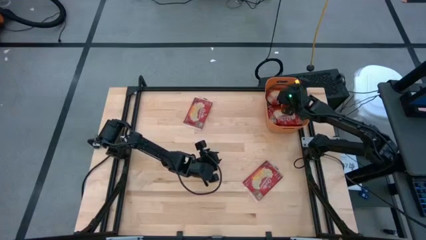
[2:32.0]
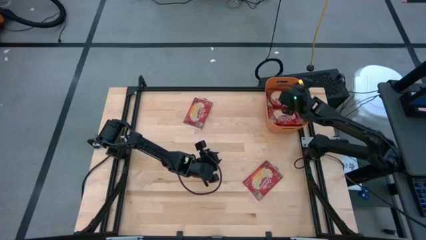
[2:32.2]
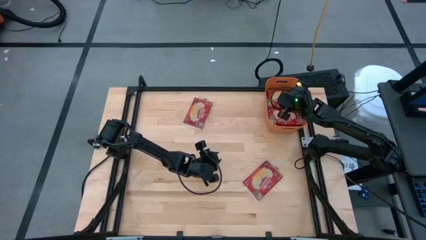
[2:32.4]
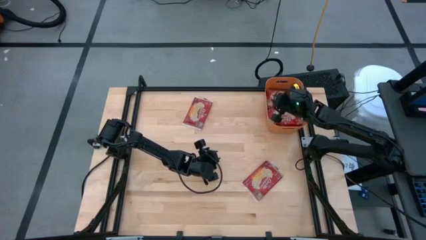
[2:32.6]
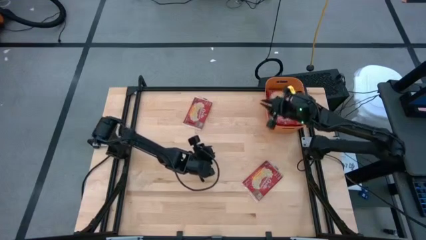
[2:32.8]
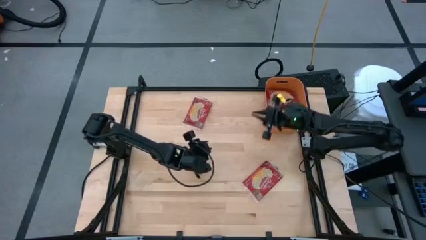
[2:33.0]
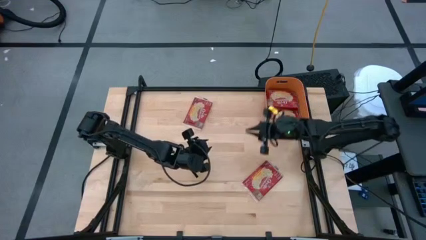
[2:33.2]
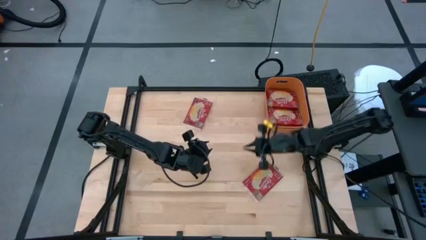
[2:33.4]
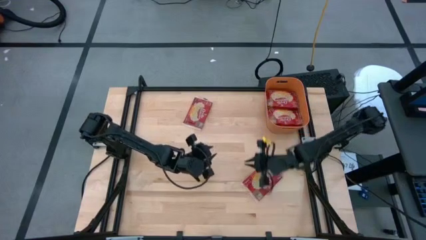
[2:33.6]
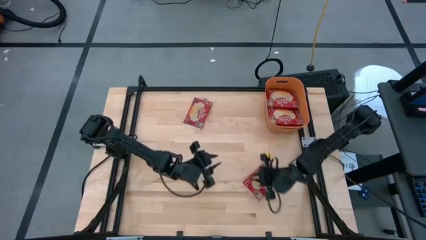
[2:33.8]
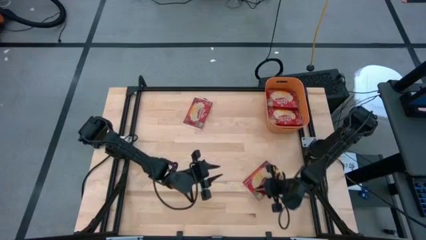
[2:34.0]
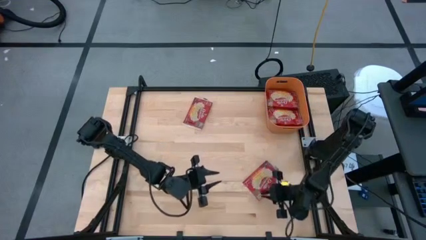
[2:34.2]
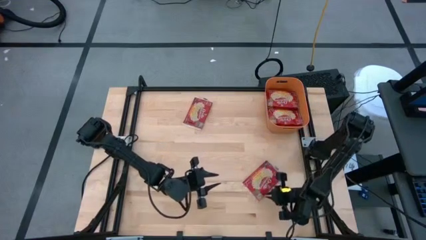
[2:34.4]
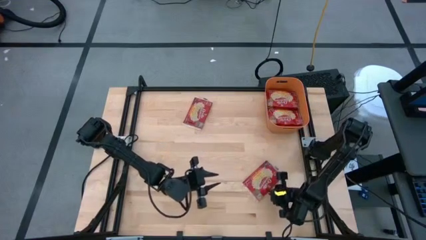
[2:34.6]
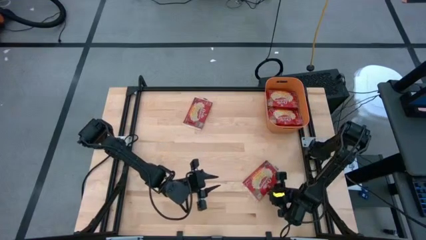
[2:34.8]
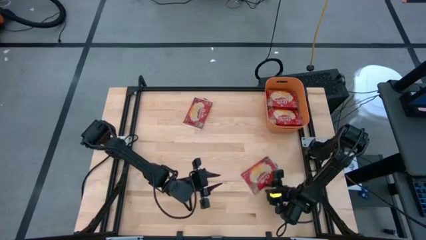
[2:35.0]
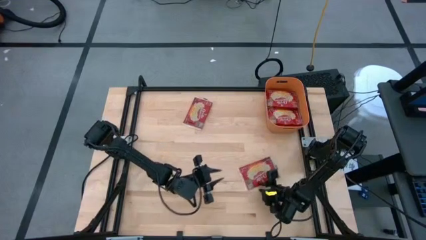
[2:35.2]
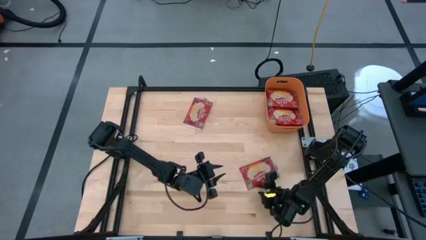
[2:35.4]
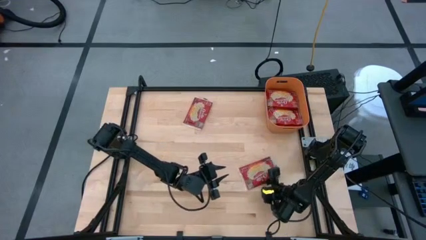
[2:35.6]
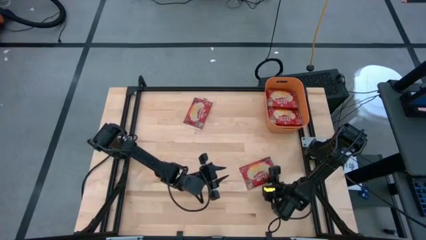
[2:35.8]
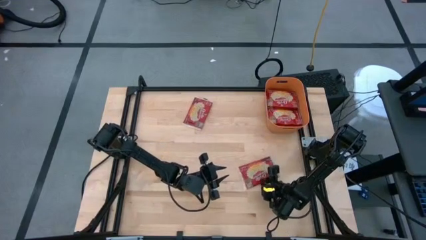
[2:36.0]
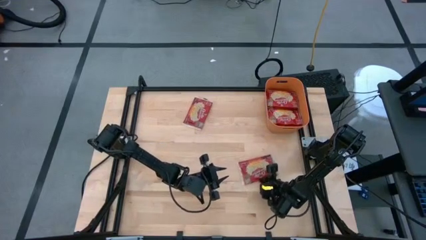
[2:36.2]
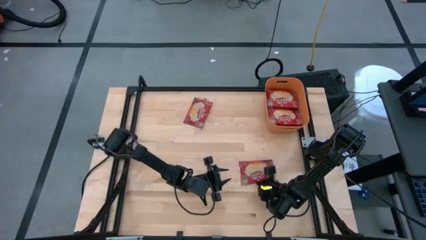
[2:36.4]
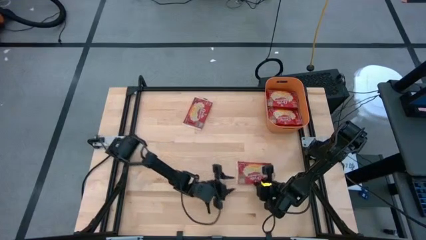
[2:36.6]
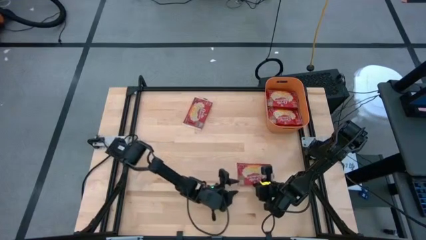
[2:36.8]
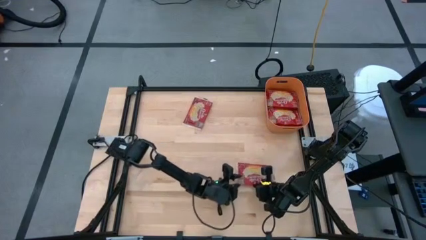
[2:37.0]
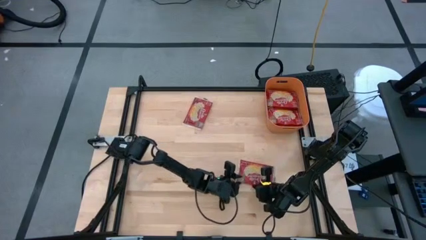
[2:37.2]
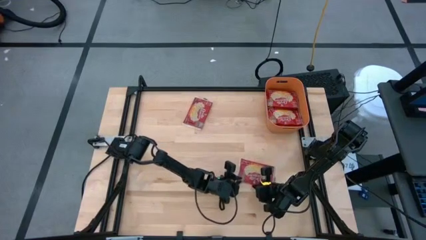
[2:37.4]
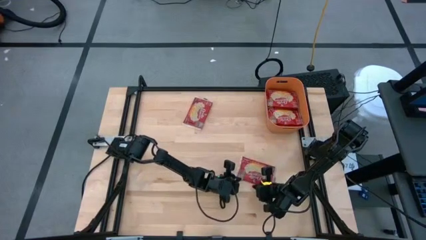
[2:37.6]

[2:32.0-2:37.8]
Task: Sort popcorn bags into baskets
Put the red popcorn bag into the orange container

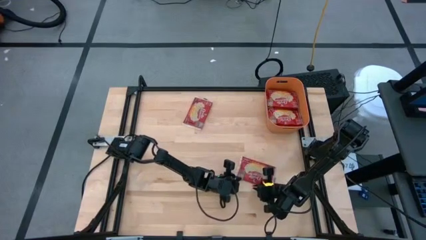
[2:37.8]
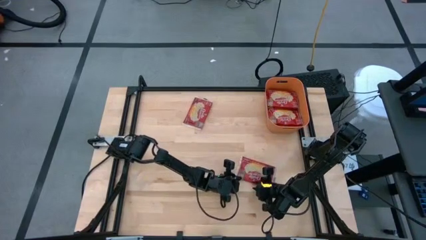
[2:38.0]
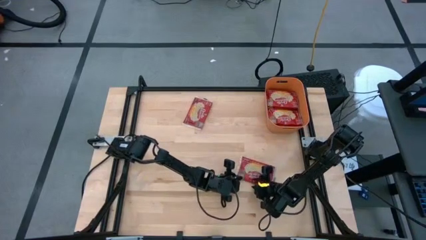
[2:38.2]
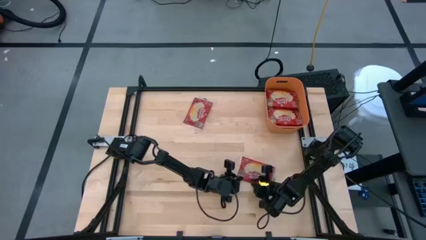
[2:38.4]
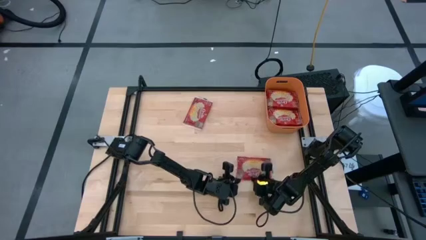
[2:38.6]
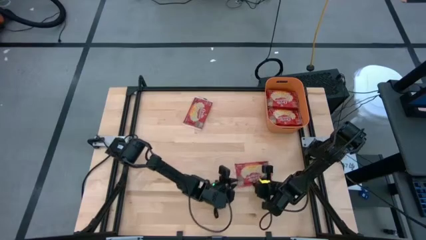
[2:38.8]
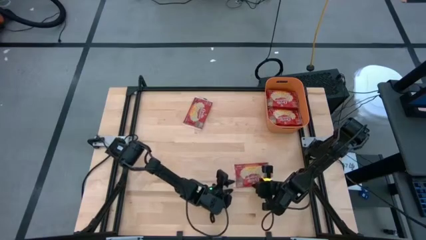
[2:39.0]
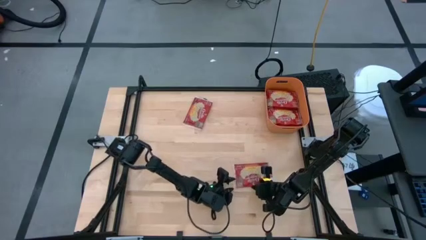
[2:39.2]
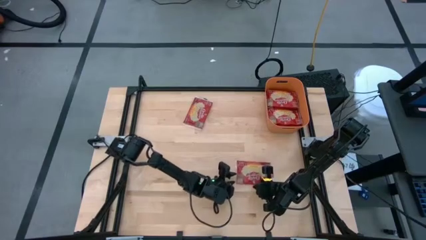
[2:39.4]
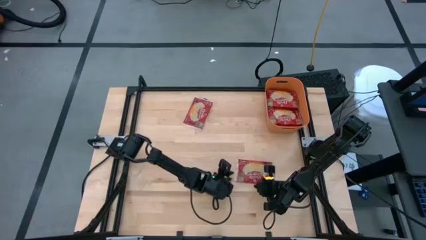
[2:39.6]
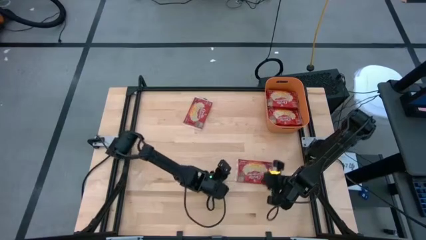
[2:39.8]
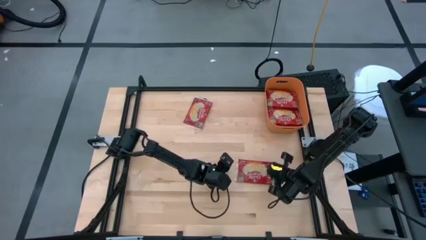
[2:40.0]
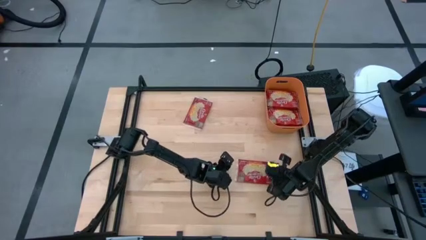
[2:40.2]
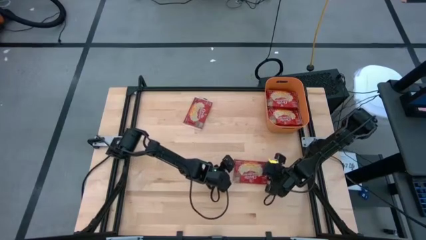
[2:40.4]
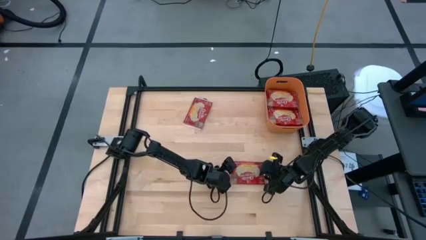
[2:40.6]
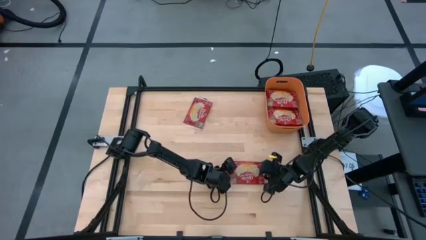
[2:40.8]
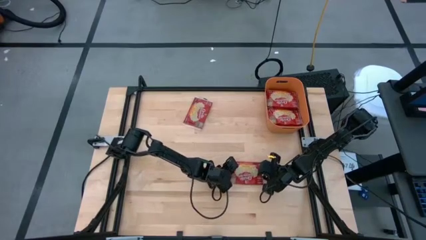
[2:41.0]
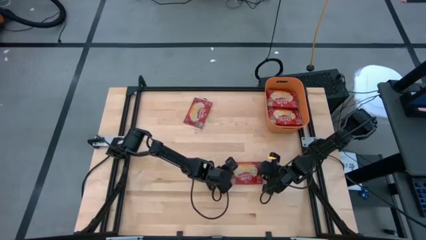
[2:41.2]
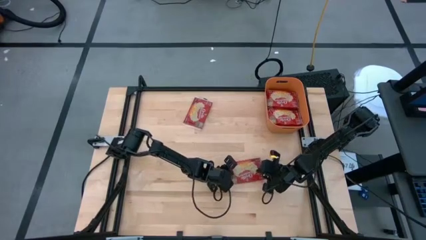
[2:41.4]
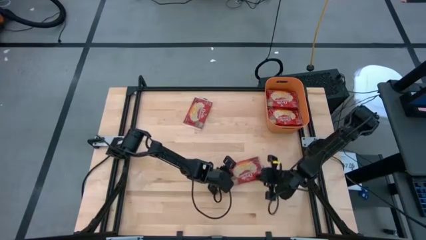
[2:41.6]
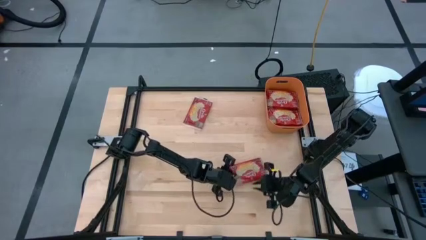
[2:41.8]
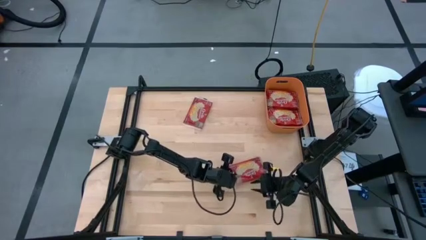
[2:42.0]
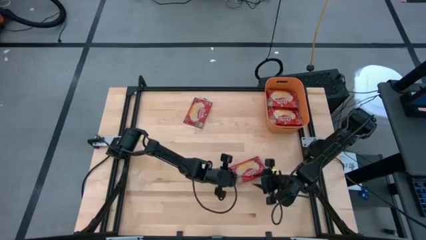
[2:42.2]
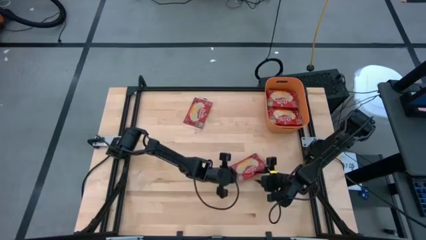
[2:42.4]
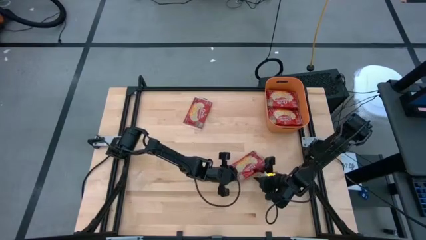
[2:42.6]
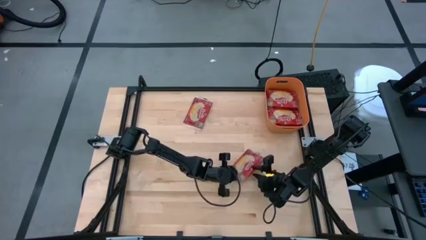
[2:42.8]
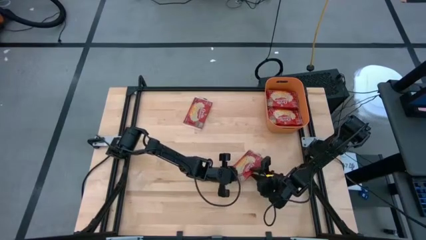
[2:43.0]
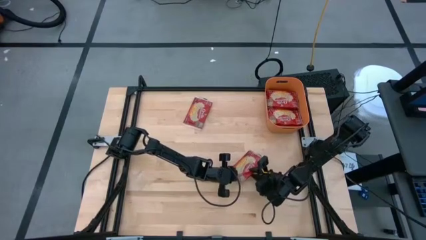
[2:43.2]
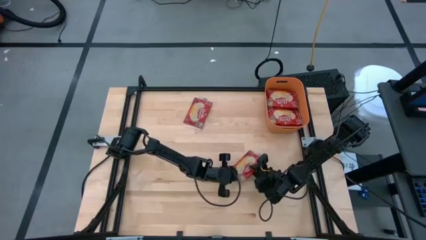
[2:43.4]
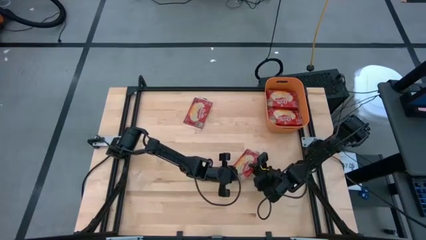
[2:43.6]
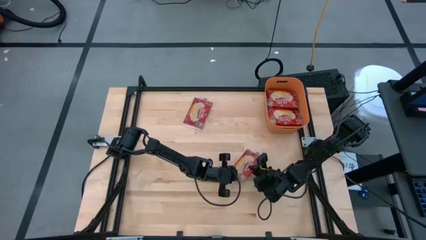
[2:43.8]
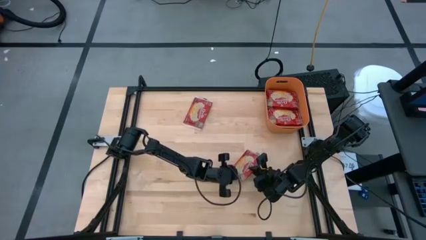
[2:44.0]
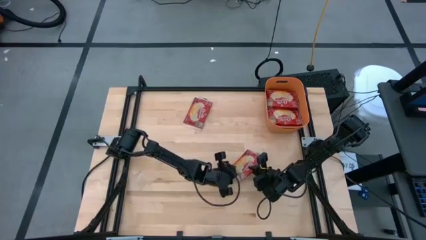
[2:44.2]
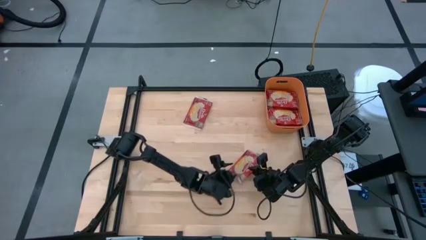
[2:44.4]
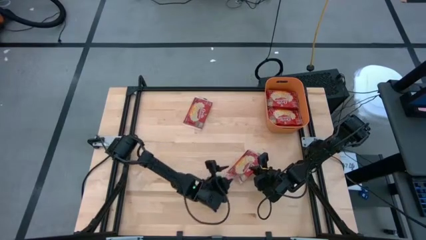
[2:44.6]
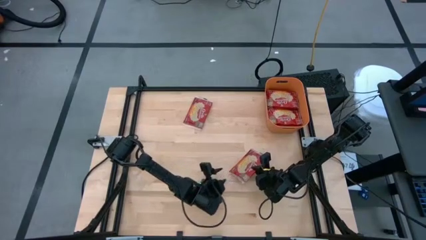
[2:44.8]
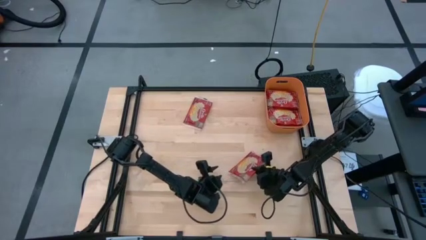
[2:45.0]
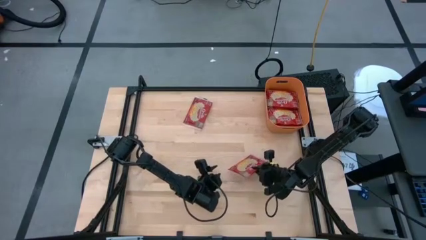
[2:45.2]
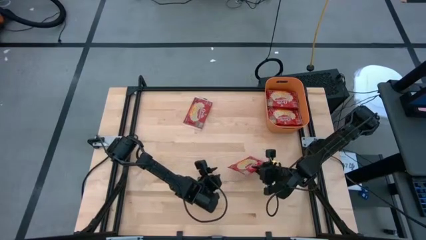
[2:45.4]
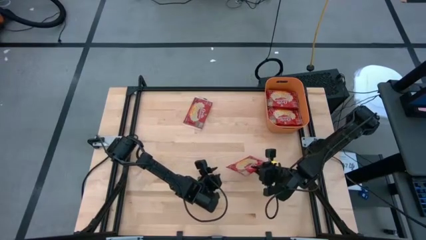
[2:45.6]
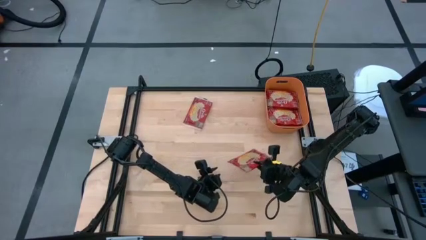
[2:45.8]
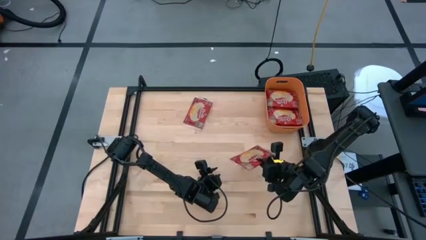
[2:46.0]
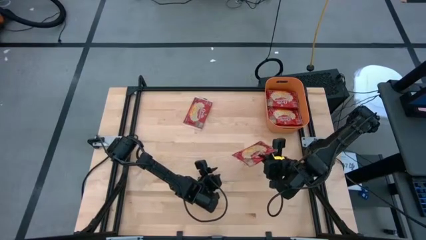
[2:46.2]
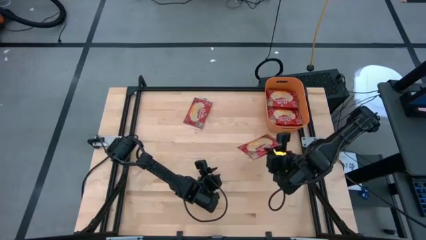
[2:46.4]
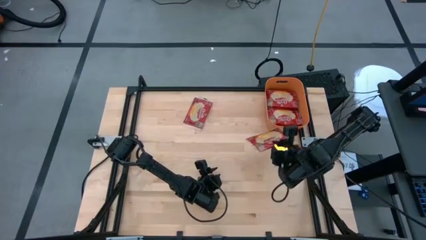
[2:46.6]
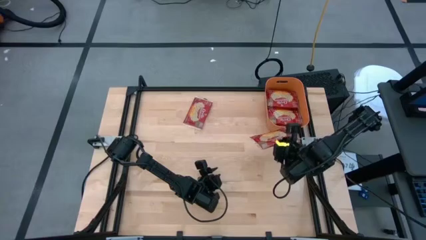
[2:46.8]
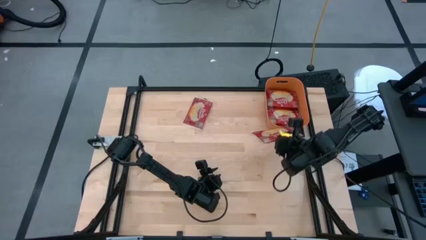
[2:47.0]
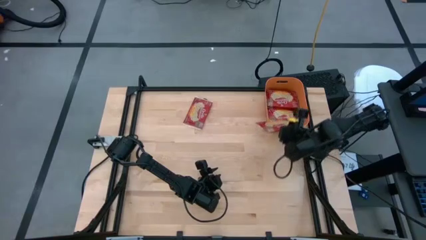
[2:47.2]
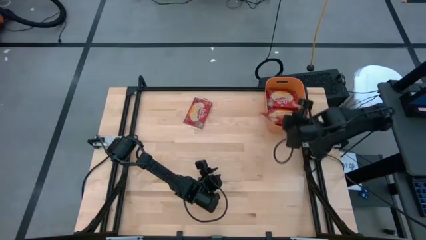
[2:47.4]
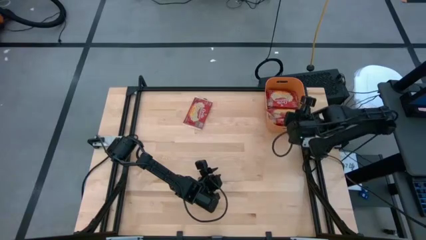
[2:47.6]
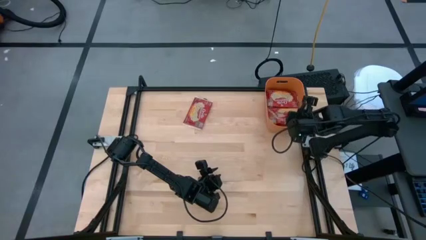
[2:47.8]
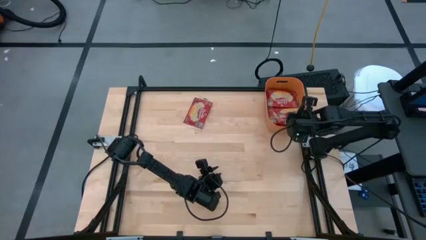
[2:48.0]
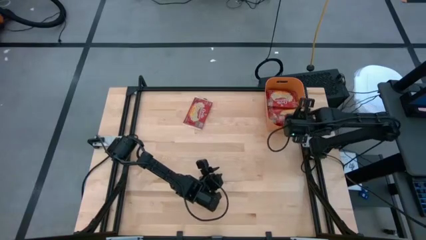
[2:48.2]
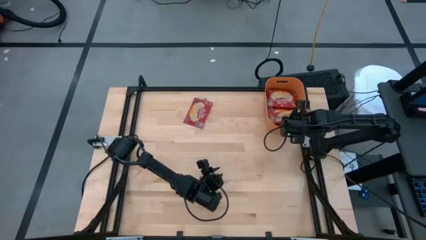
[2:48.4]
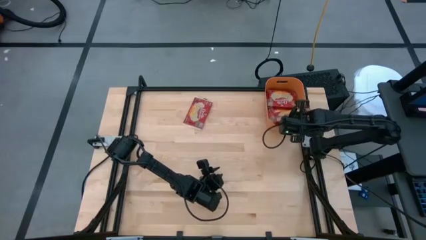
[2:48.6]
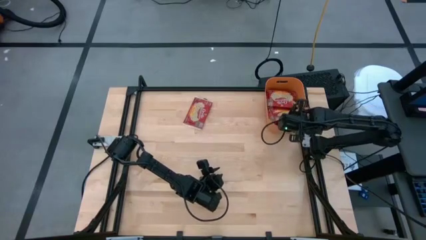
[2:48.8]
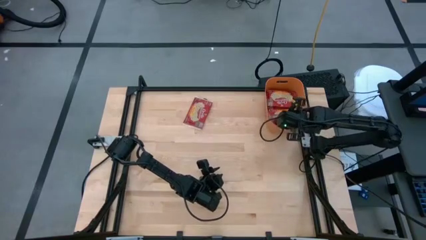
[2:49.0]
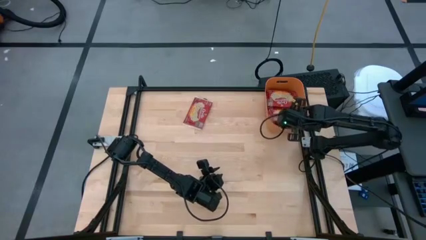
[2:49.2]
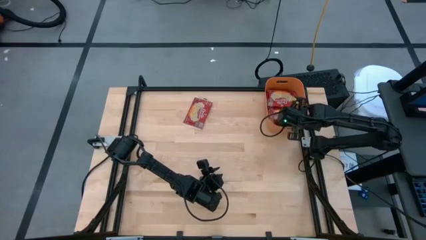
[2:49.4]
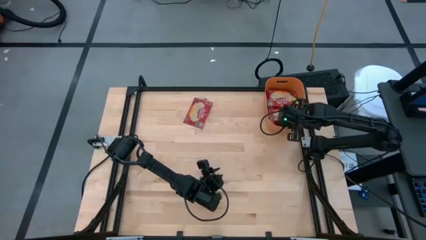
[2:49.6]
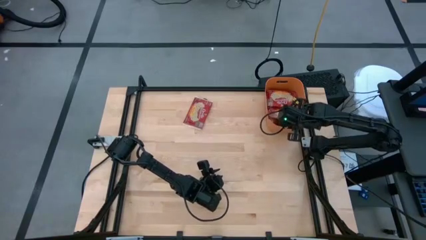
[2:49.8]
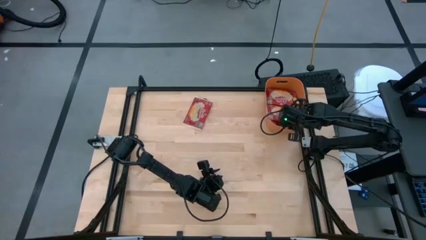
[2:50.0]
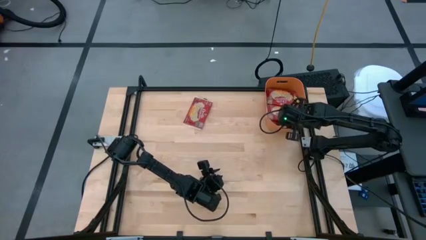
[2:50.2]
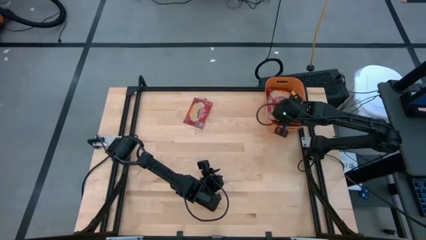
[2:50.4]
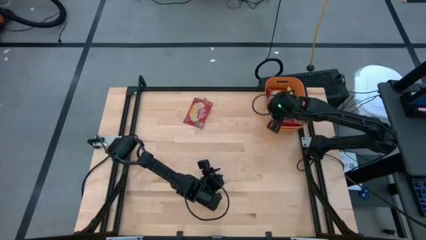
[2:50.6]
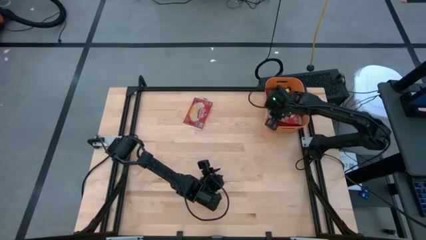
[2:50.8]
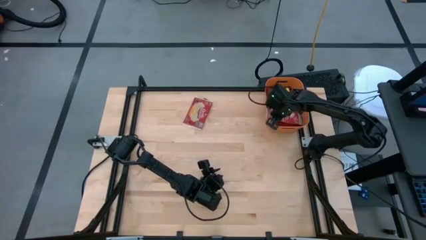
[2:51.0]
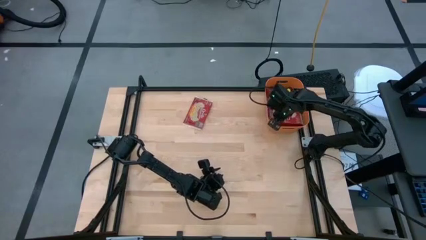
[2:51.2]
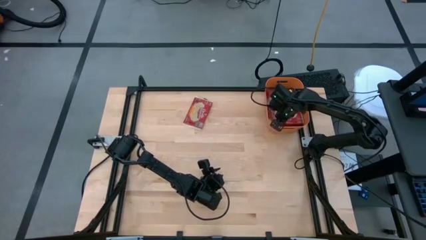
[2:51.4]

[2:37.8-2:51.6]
Put the red popcorn bag into the orange container
